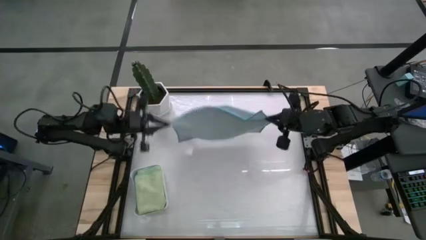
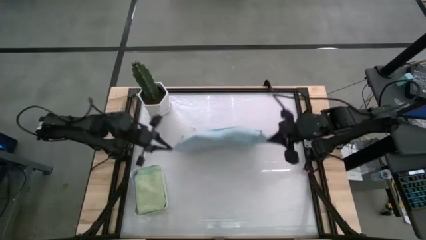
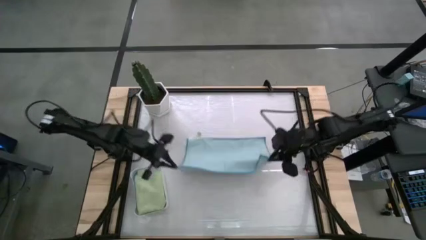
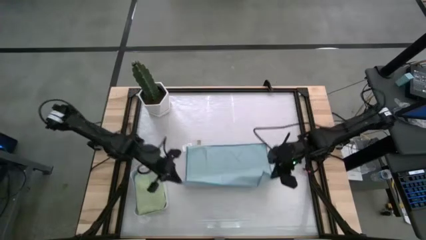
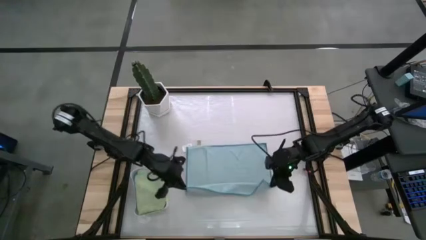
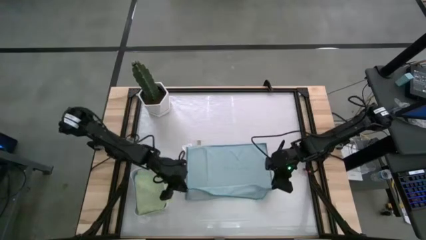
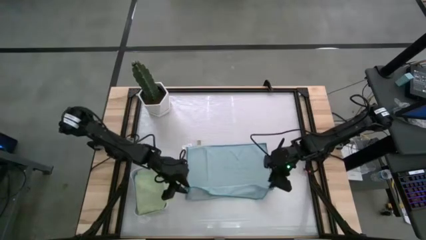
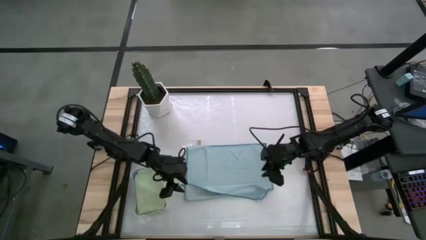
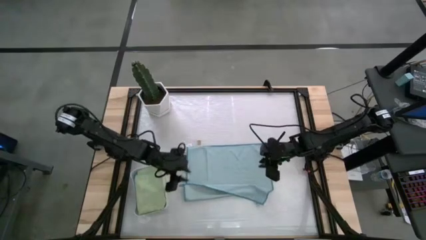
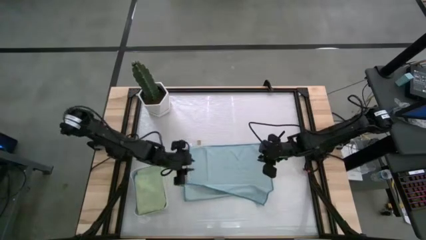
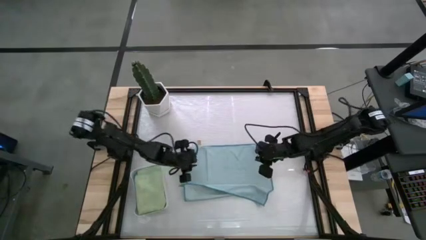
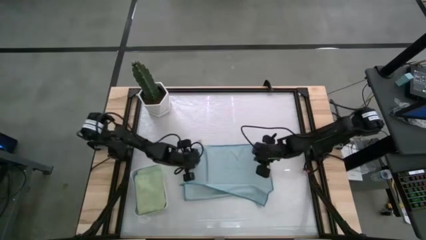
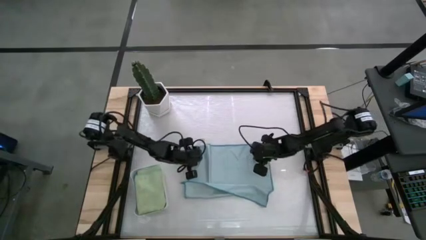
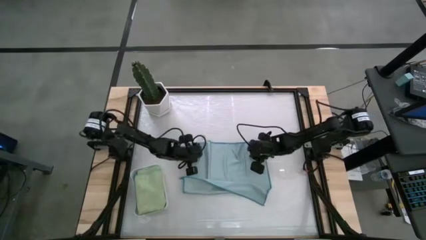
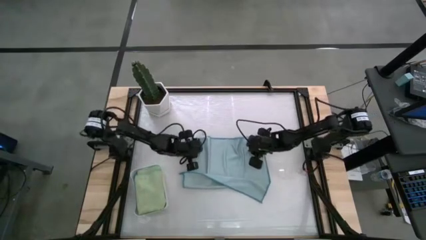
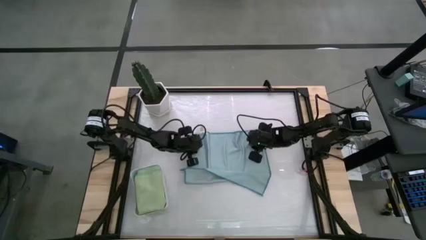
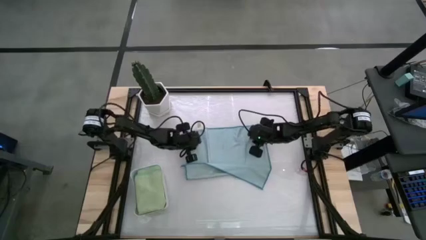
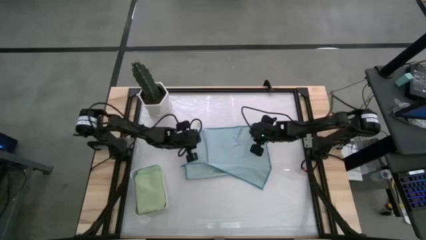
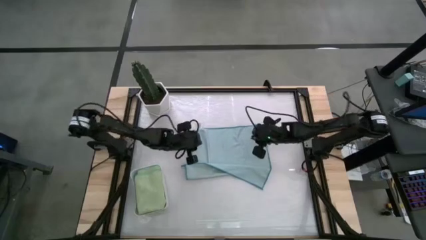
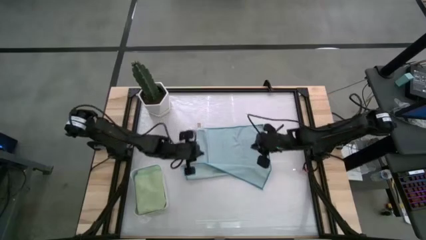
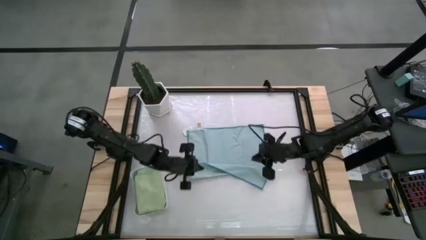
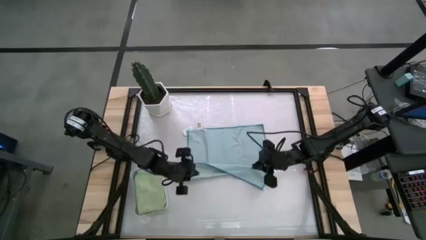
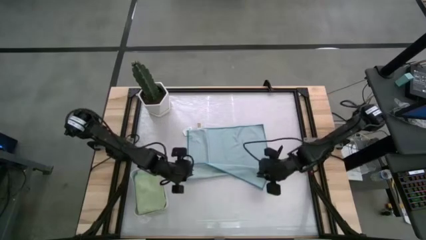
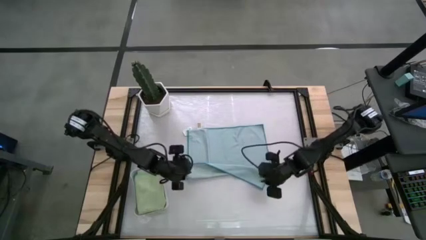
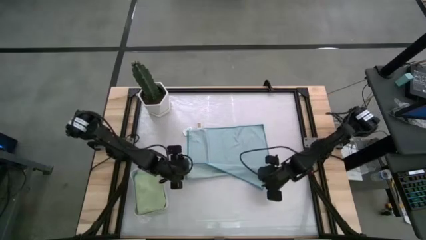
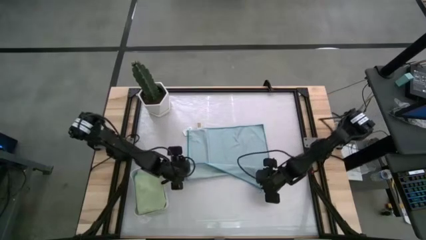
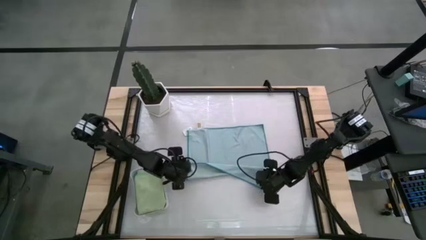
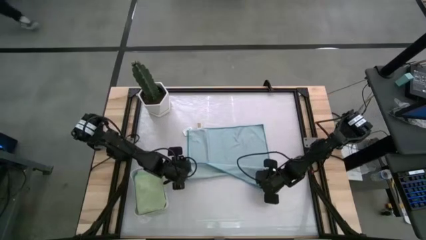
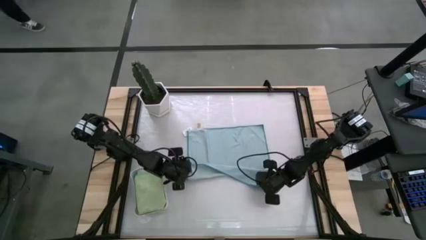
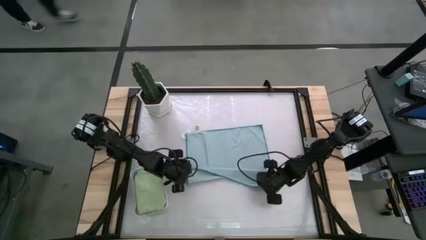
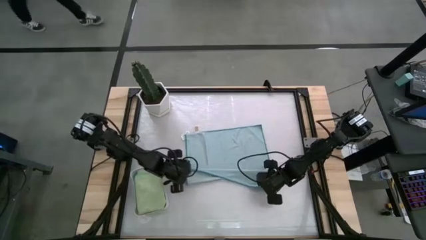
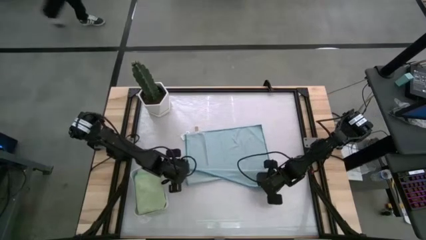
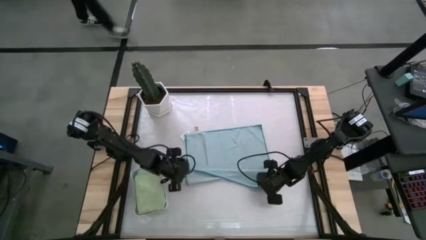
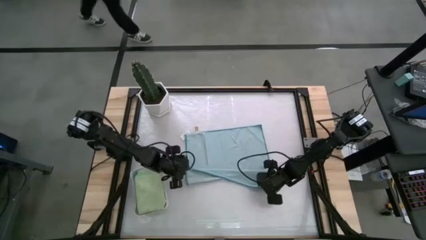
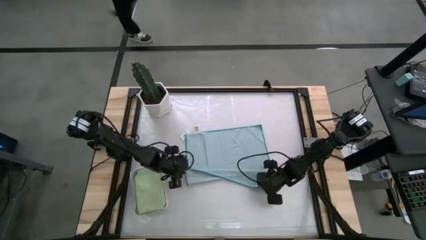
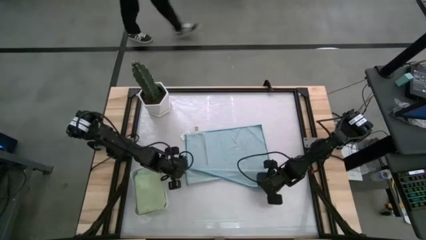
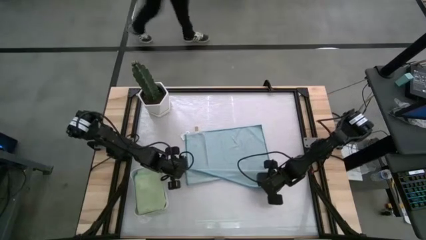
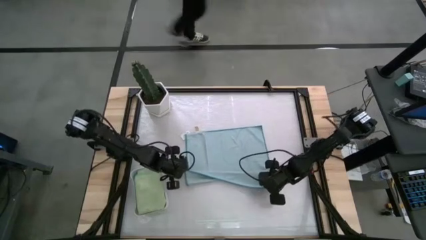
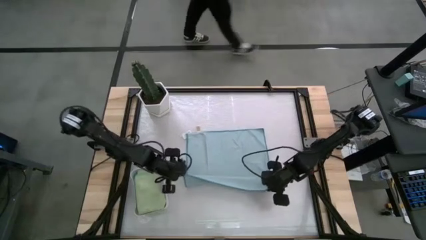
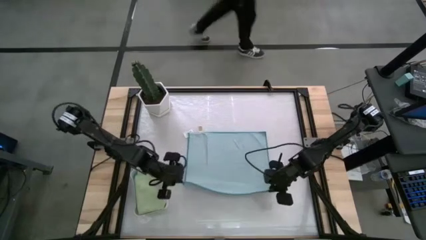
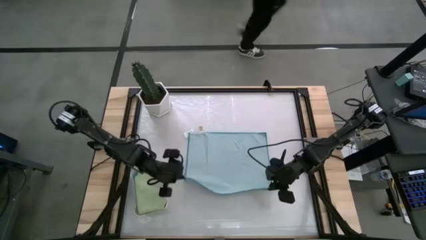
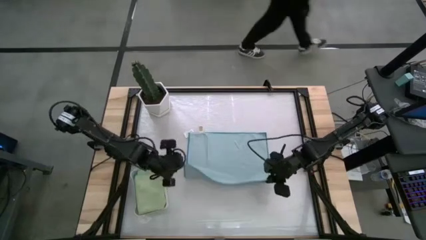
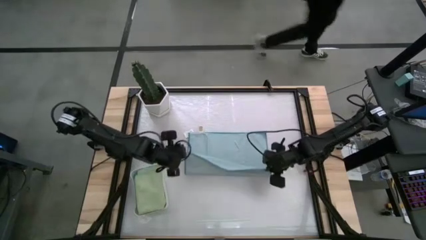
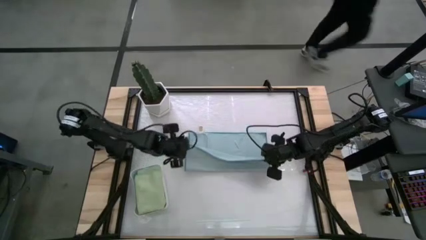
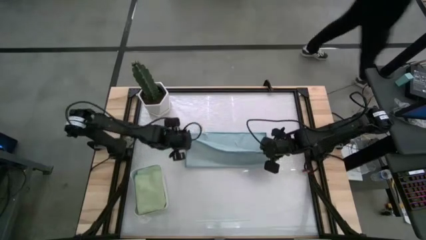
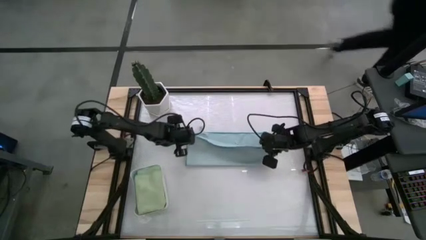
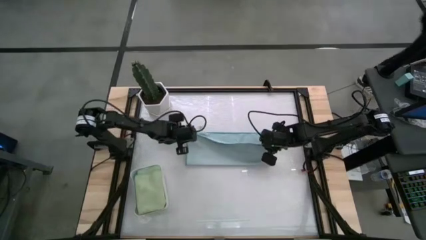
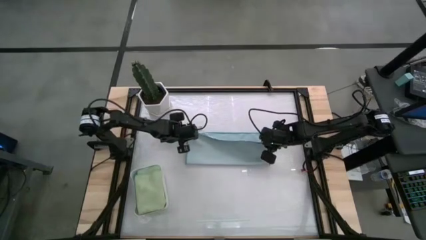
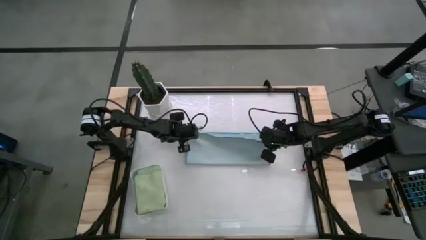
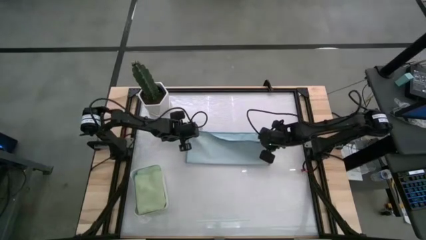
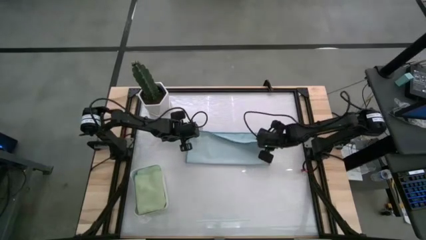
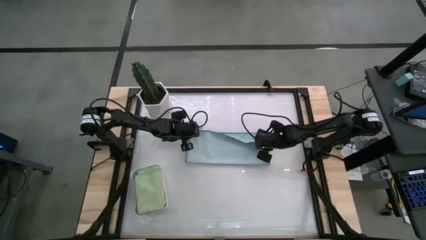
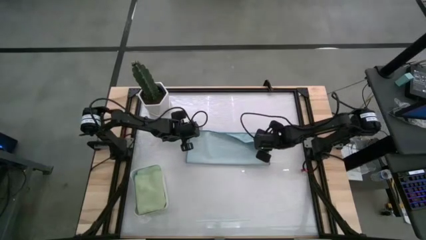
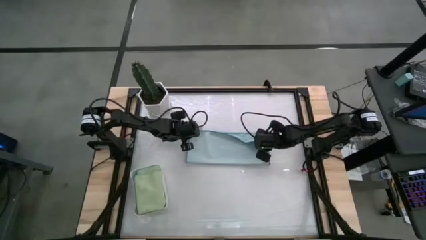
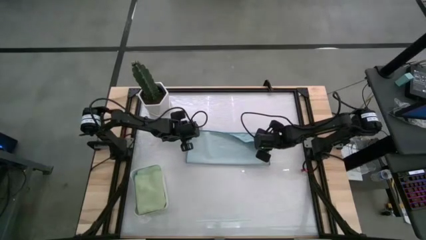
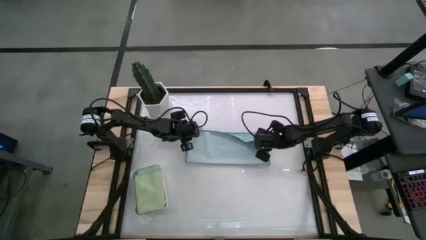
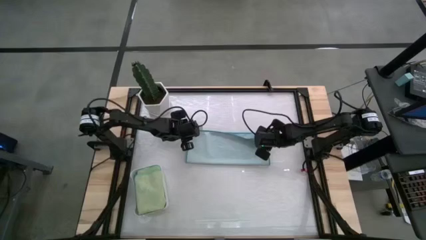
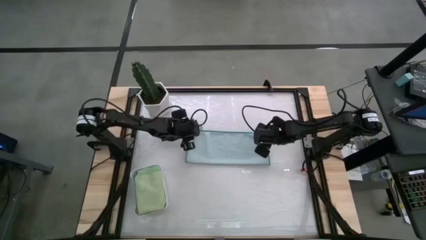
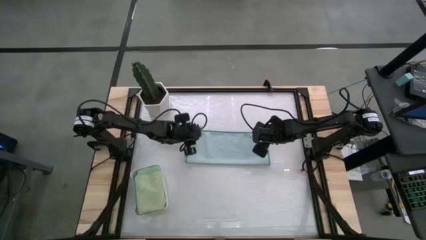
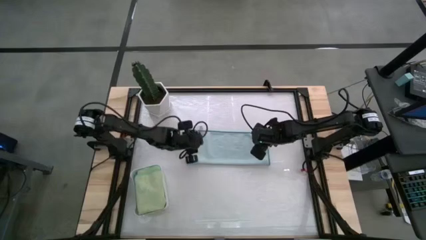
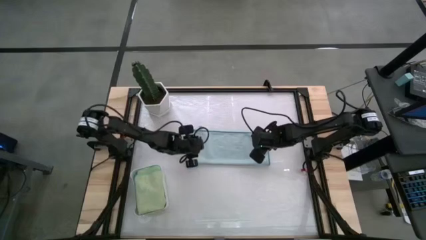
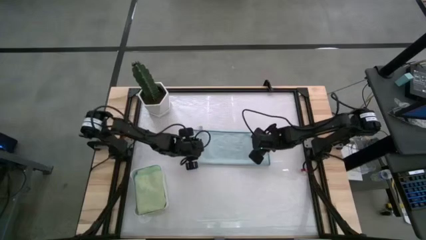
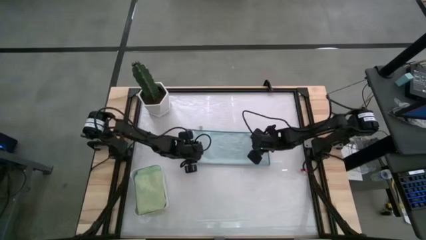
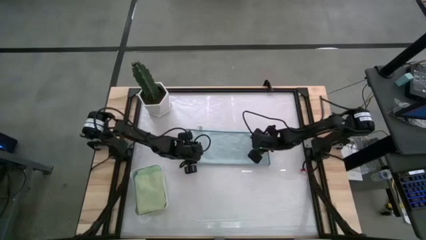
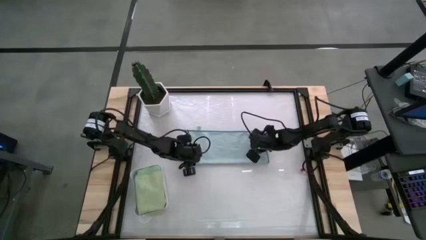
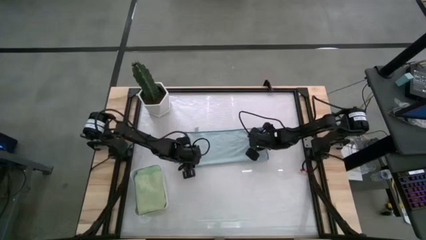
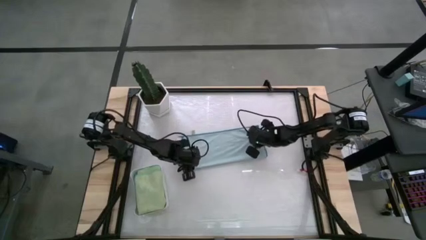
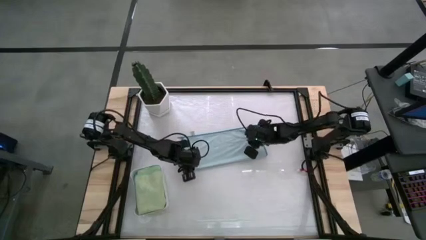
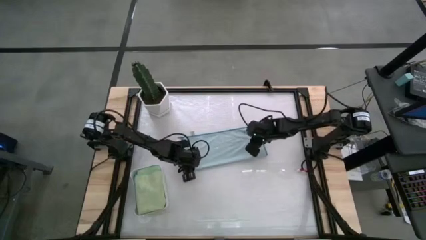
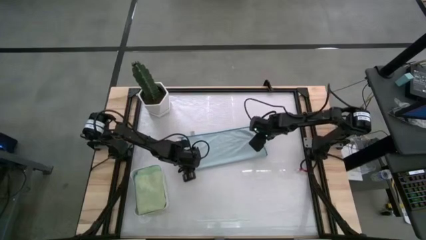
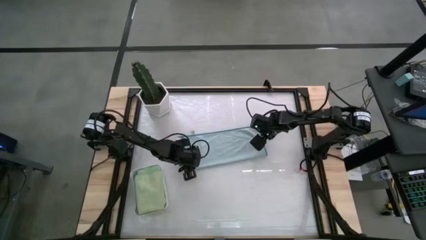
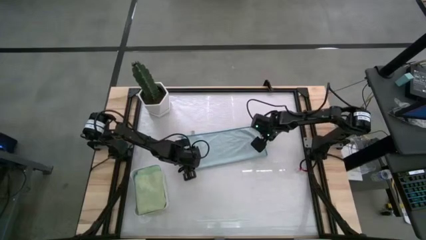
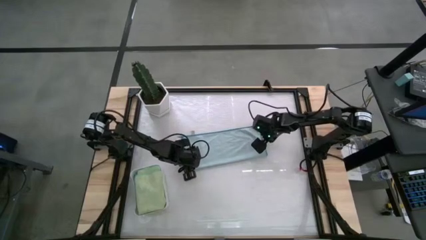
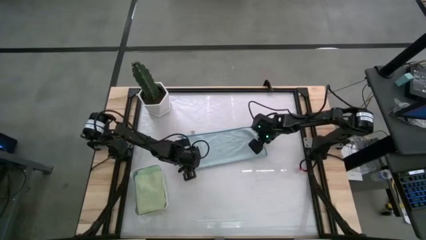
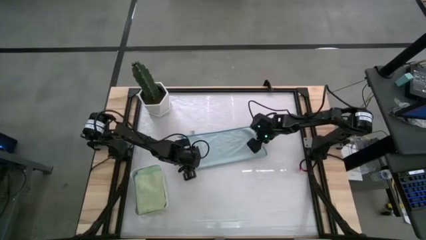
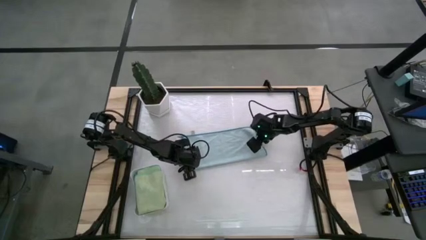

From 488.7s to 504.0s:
Task: Fold microfiber towels
Fold the light blue microfiber towel
